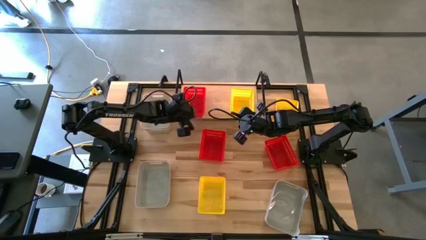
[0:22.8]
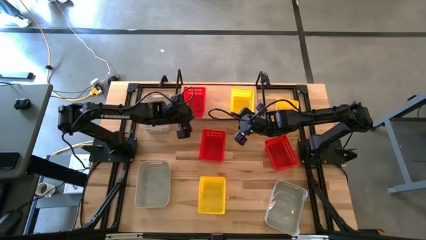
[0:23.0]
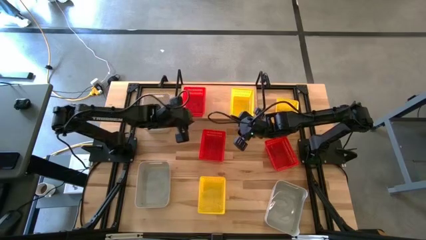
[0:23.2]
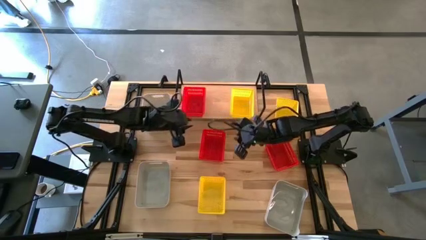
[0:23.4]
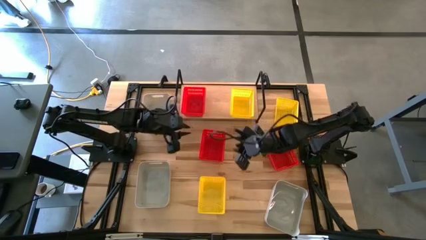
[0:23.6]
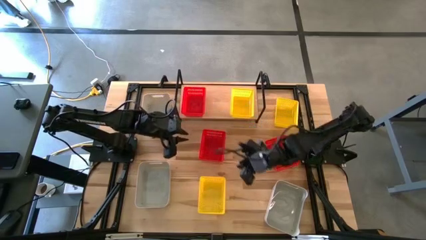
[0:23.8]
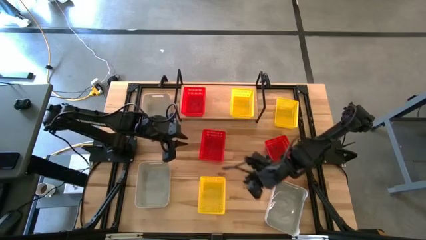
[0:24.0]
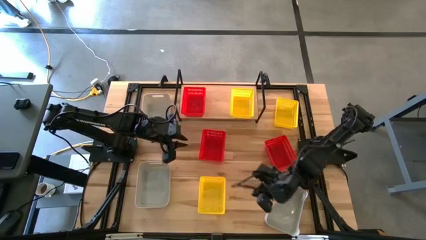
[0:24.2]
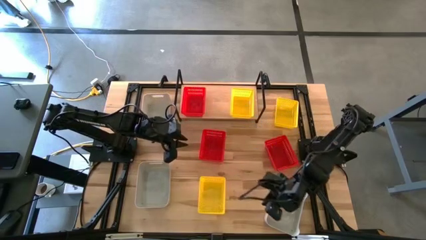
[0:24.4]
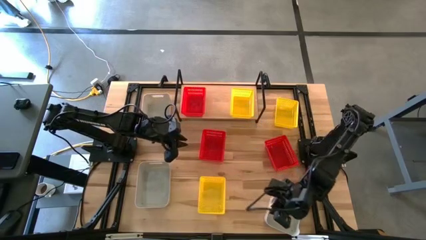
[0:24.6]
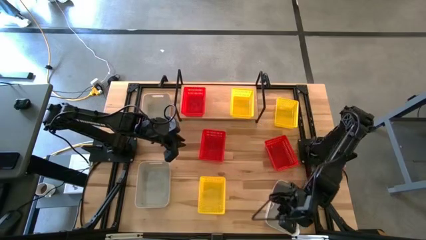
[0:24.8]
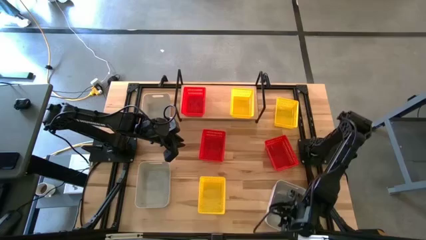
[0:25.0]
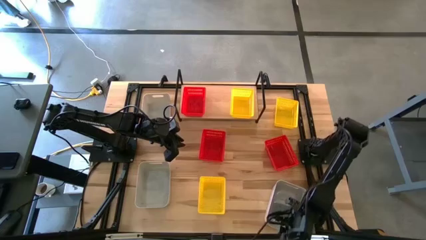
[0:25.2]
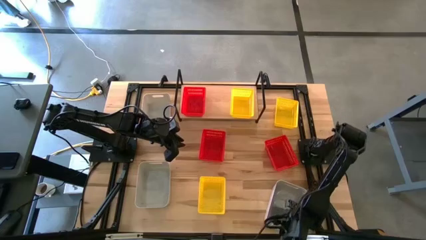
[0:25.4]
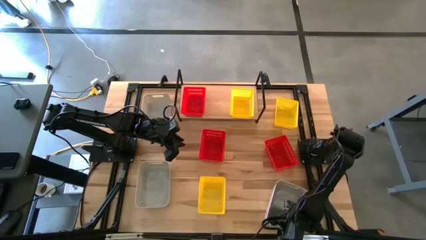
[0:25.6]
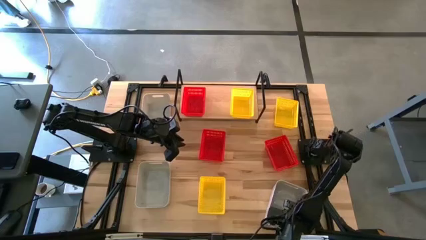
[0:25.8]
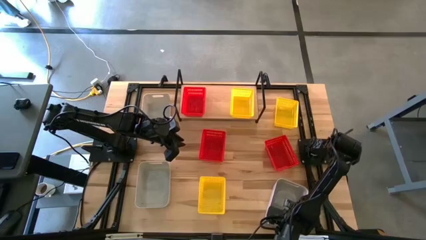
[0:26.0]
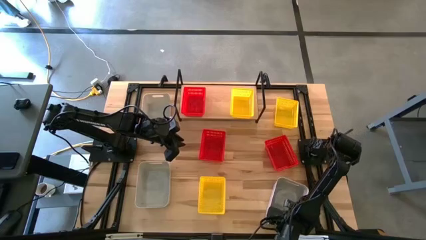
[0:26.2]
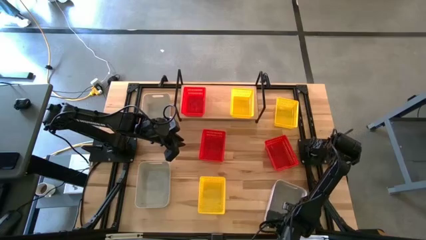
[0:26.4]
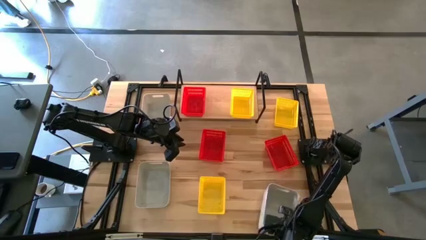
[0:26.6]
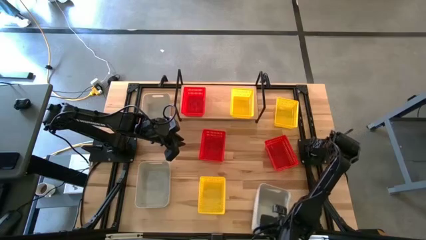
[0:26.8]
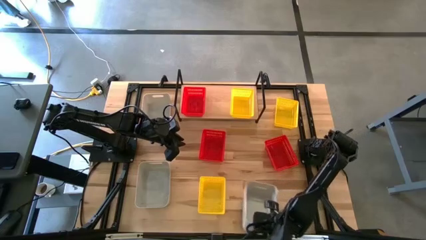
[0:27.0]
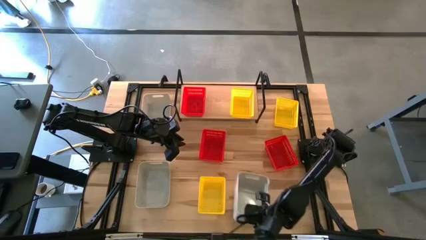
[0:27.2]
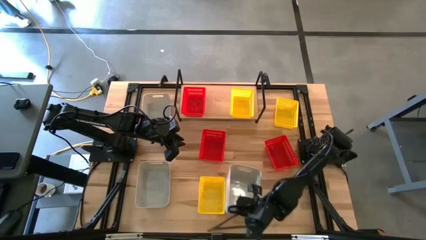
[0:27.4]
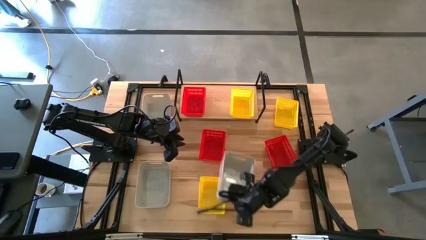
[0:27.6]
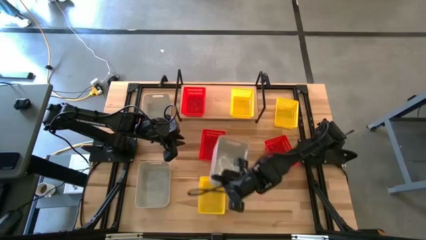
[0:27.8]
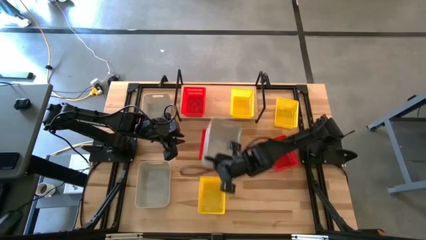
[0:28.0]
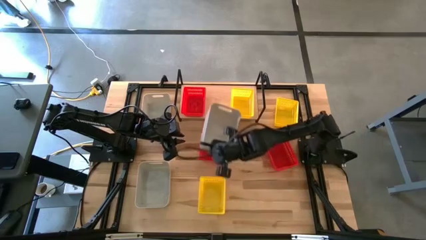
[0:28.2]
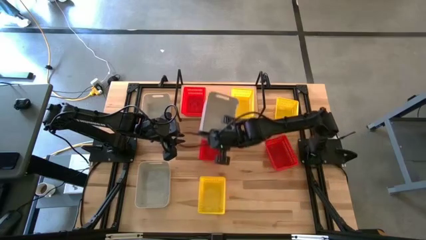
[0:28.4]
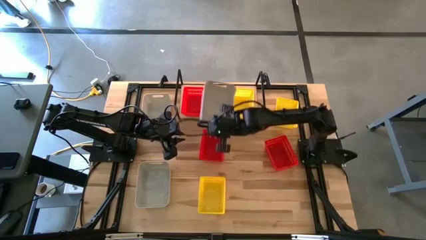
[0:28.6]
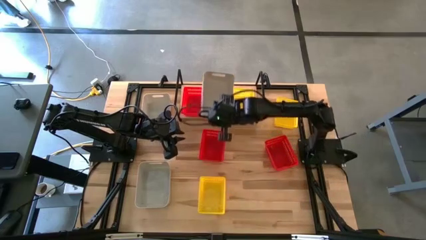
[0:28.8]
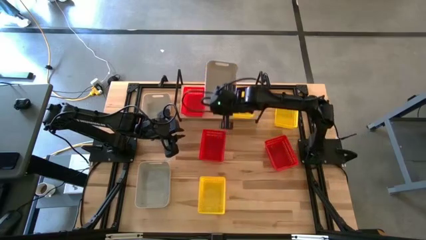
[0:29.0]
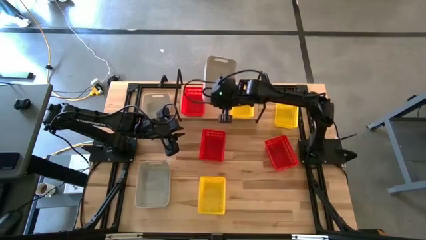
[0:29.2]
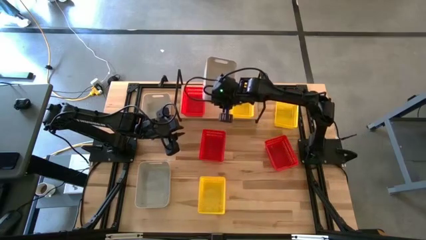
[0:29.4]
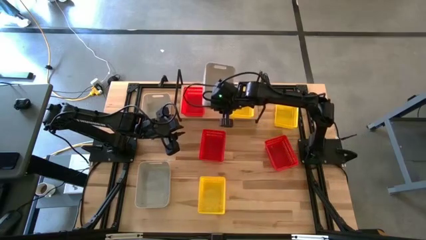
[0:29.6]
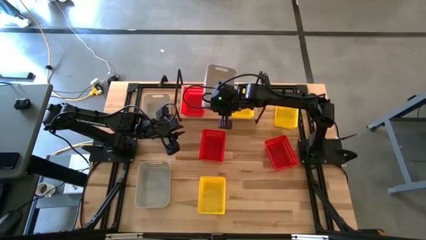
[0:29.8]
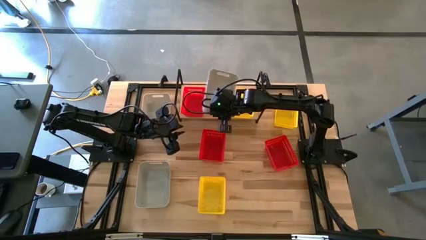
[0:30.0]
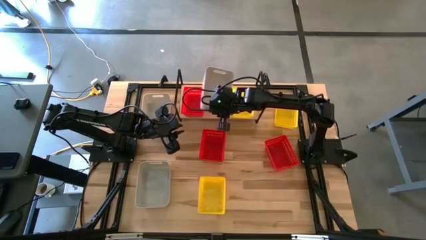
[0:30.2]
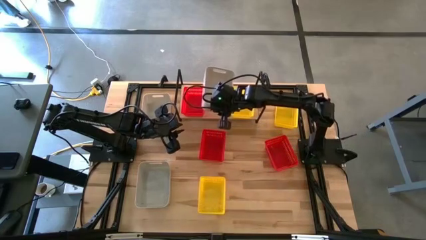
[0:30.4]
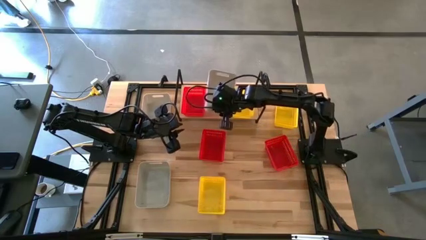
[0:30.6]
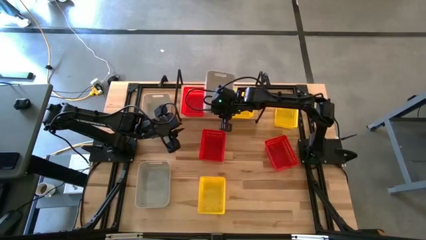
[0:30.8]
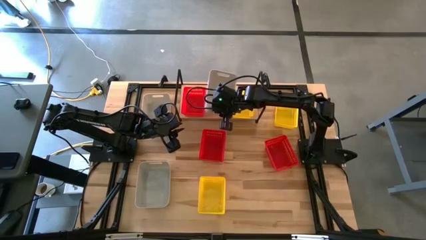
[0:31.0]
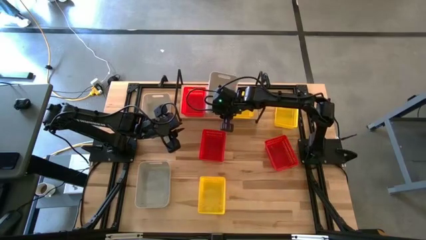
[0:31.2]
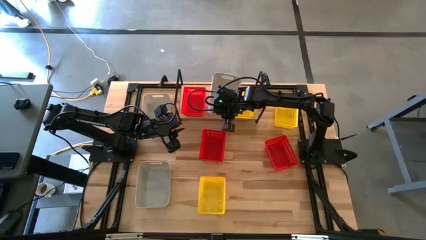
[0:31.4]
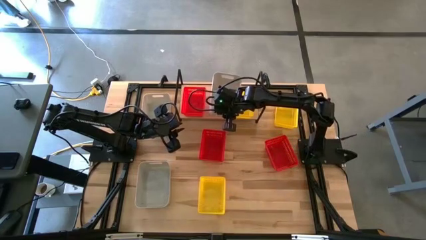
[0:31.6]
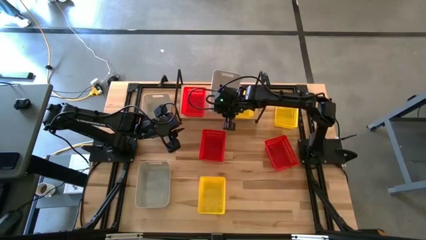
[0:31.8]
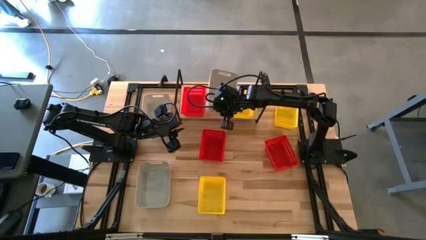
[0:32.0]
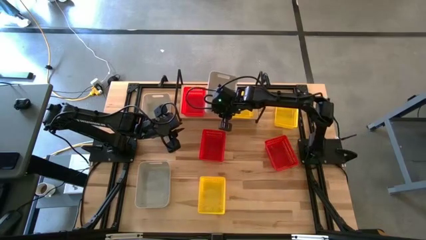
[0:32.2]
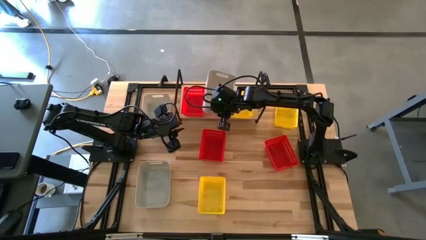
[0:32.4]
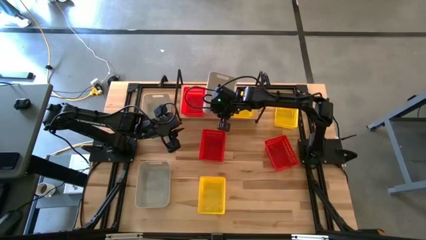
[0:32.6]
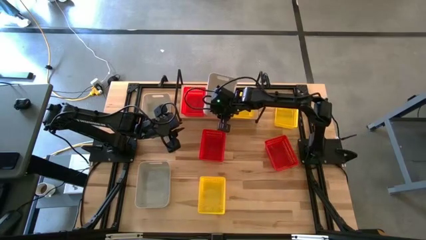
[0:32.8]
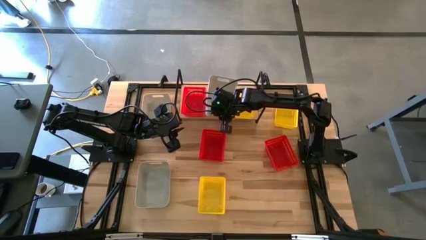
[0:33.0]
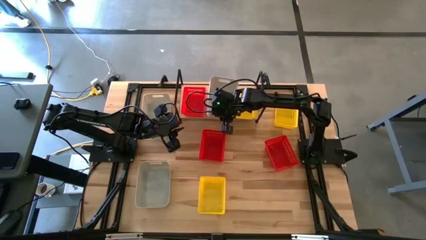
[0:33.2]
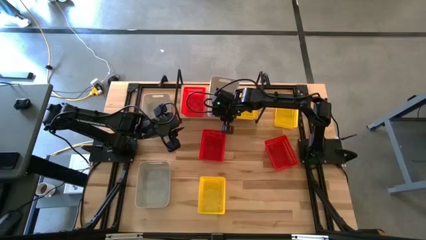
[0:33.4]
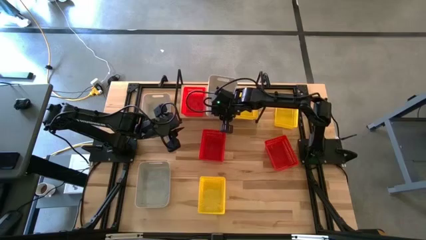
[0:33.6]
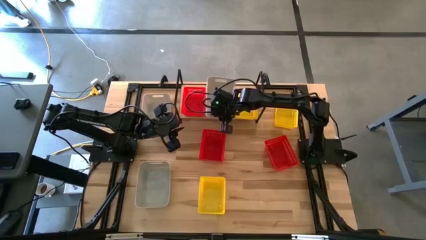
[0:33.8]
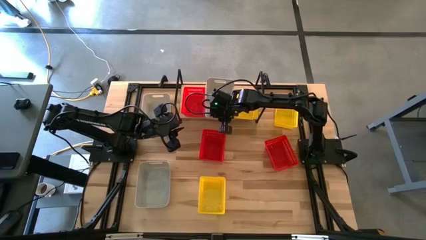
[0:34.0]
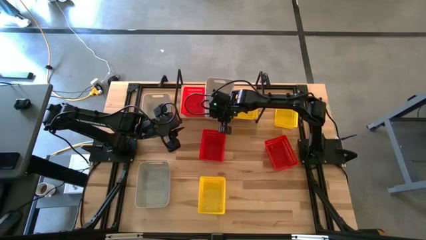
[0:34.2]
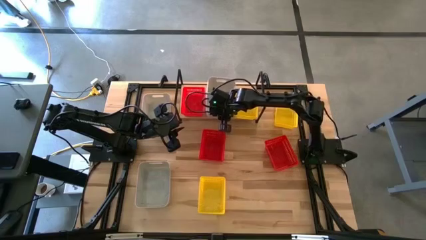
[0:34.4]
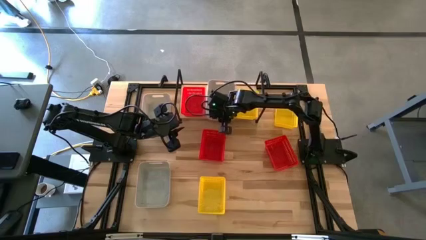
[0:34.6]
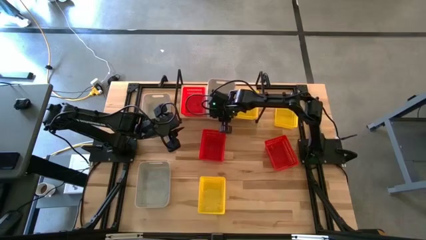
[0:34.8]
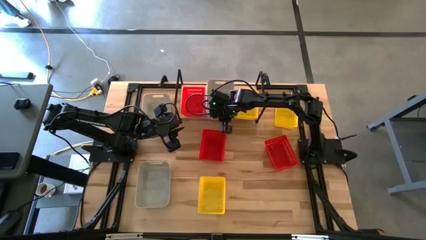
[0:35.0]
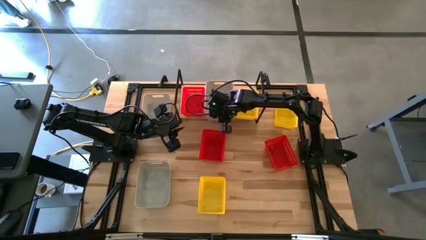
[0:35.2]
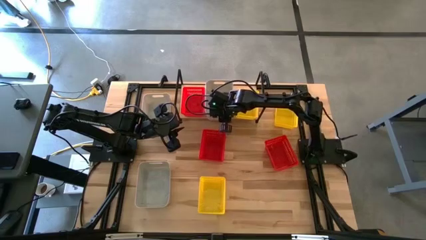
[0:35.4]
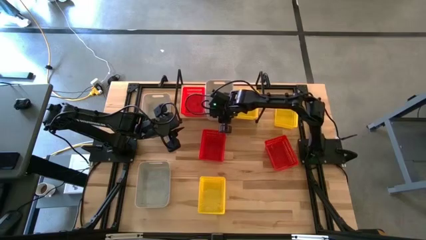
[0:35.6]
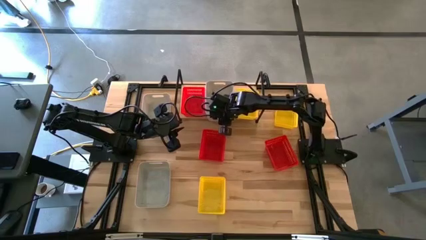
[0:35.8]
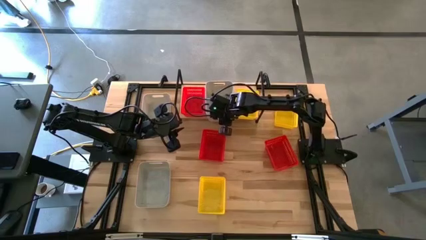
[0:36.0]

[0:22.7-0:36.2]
Task: Stack baskets on shelf by color
Put the bottom right gray bin on the shelf
